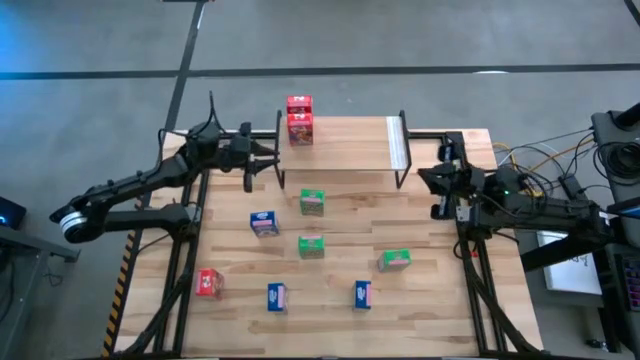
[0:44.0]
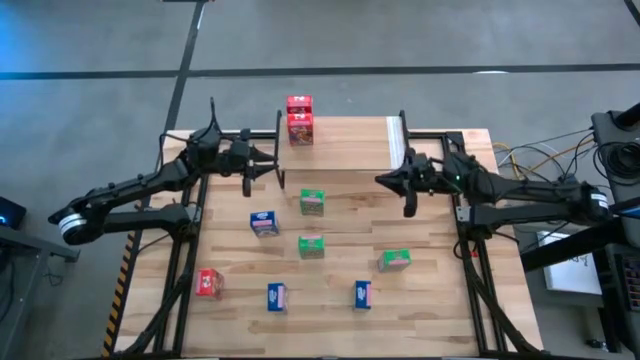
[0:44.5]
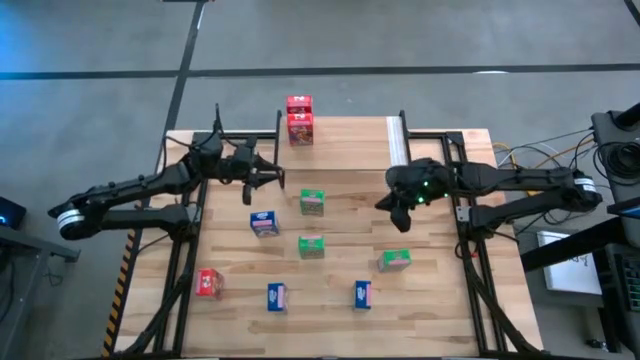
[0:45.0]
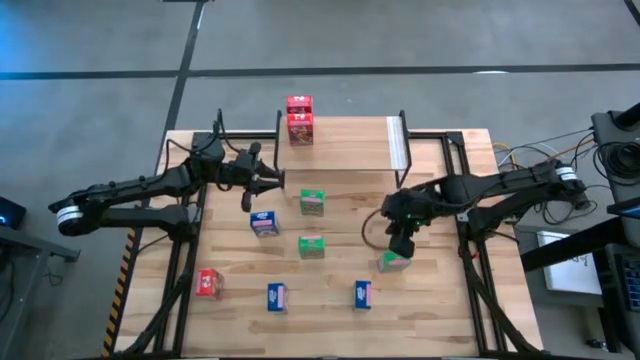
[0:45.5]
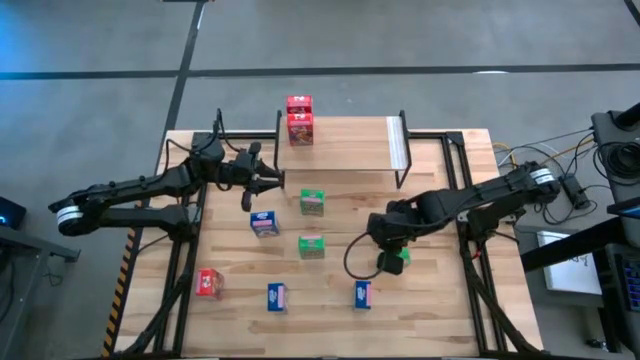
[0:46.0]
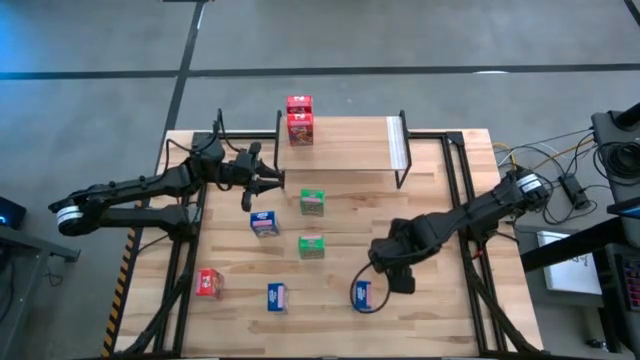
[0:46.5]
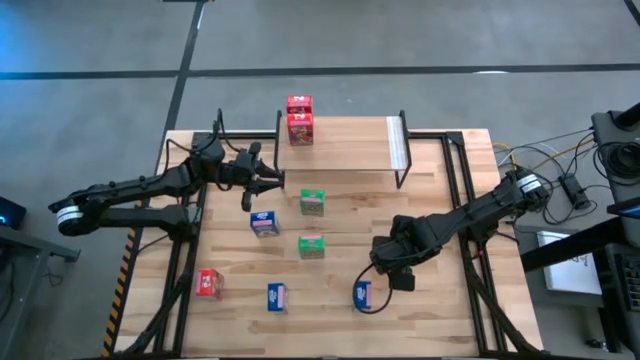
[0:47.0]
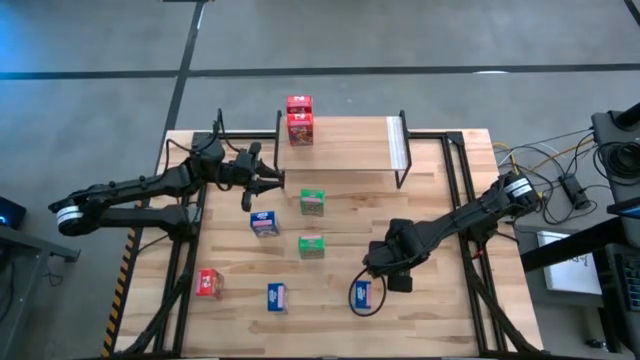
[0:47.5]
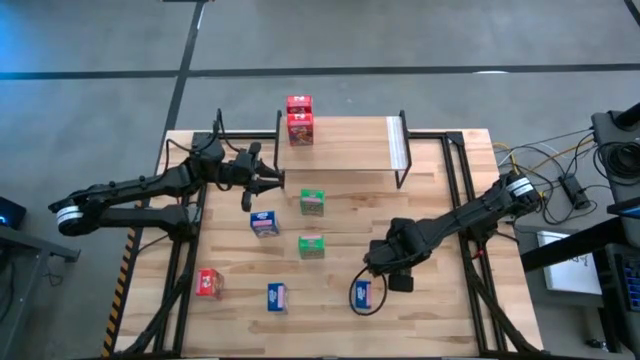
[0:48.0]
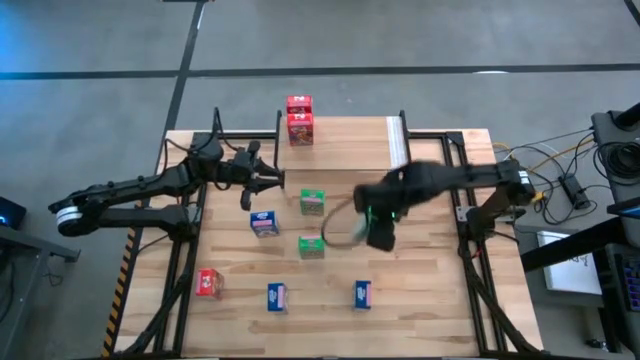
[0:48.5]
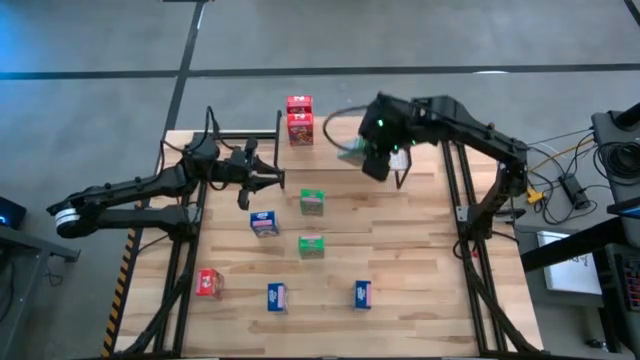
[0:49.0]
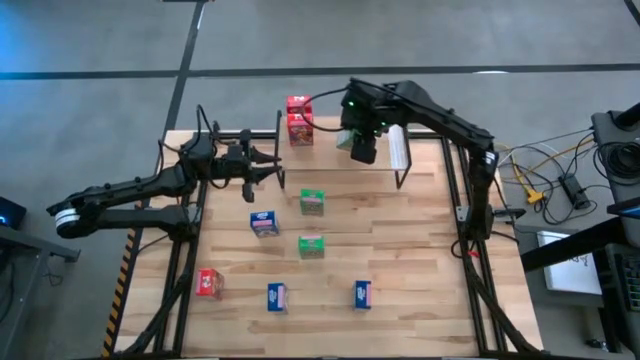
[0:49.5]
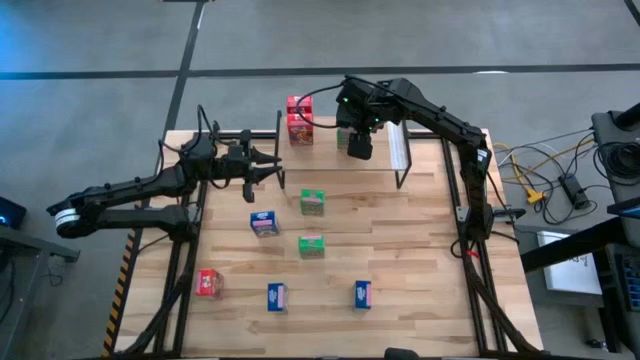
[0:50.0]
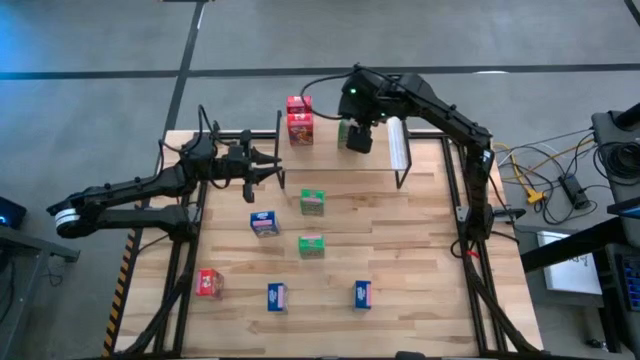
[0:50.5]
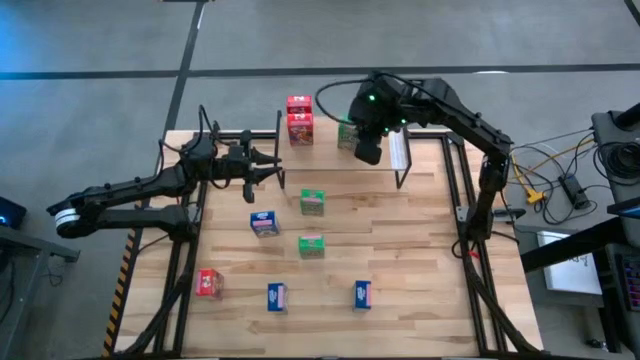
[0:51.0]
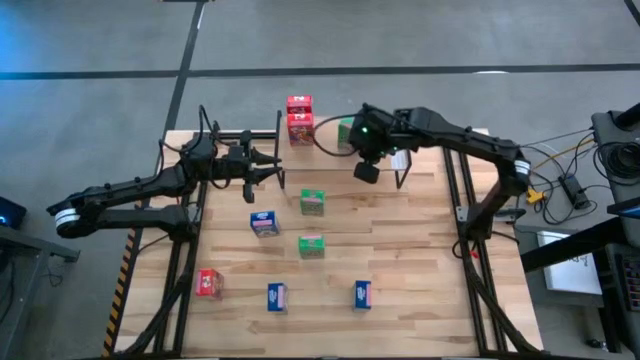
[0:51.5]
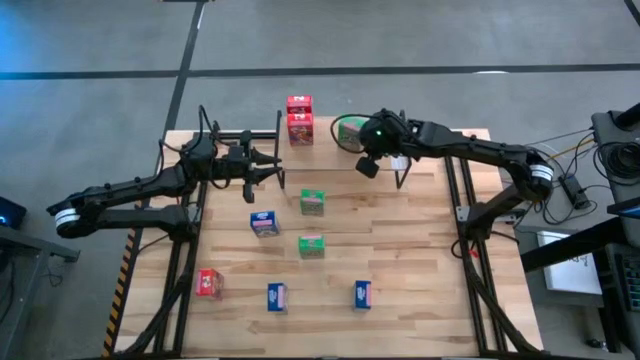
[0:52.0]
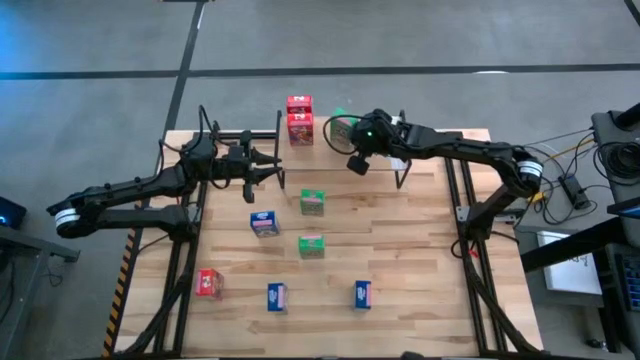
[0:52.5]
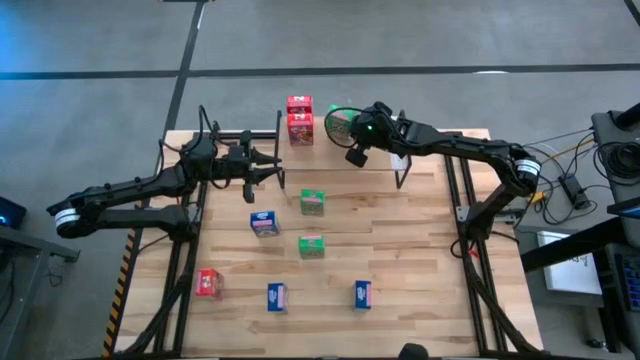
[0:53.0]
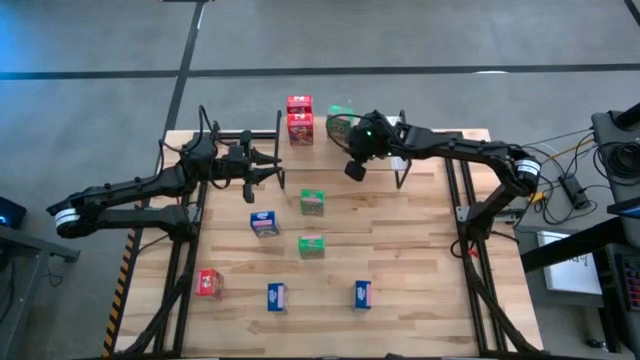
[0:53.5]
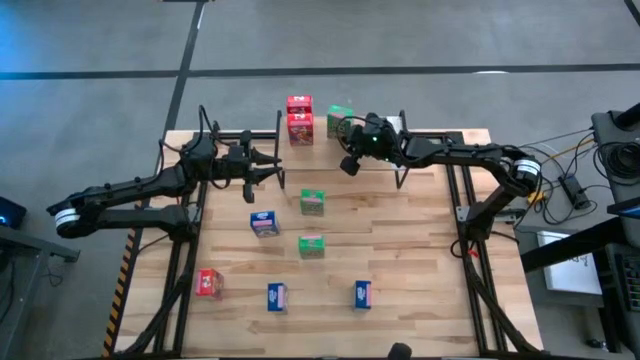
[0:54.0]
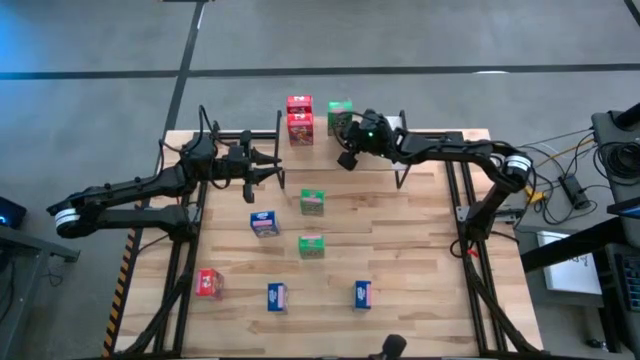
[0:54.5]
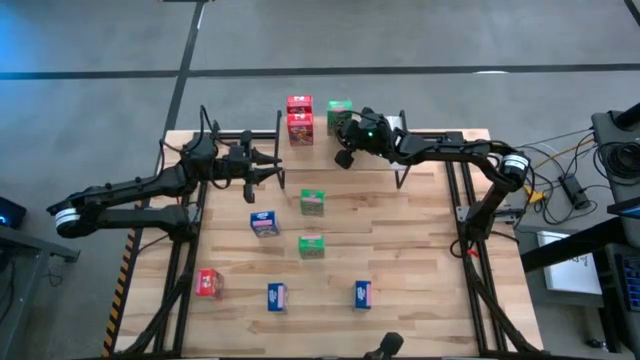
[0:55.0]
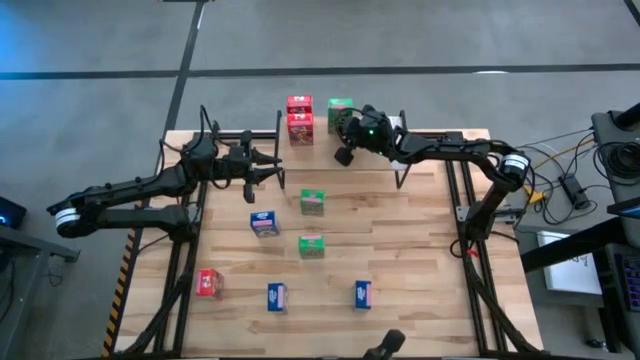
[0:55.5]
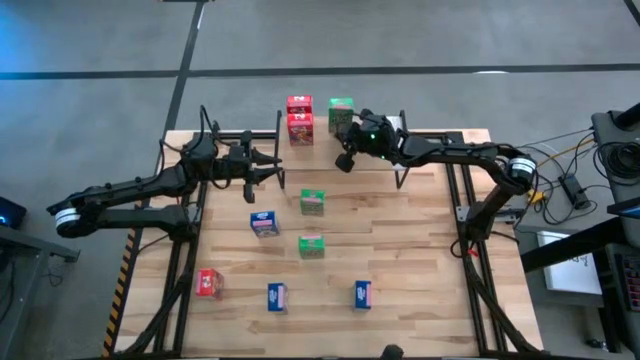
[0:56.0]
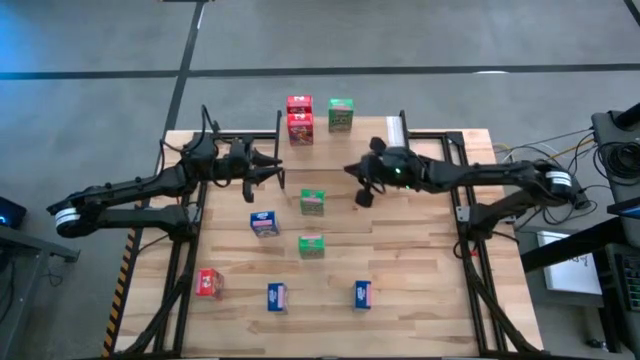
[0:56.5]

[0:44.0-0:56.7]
Task: Stack cereal on shelf
Put the bottom left green cereal box on the shelf

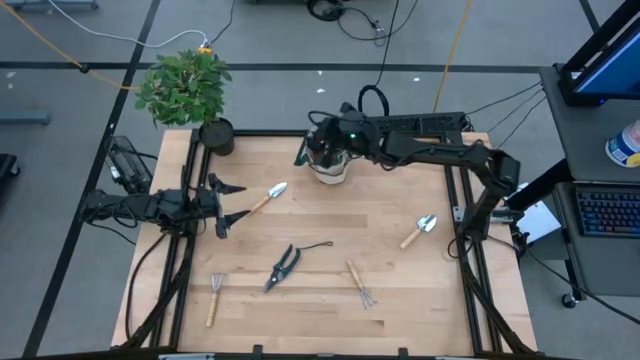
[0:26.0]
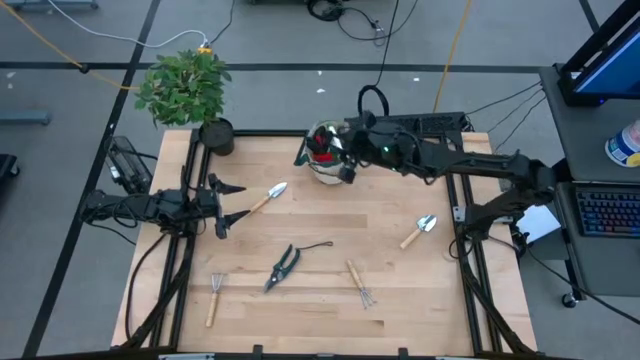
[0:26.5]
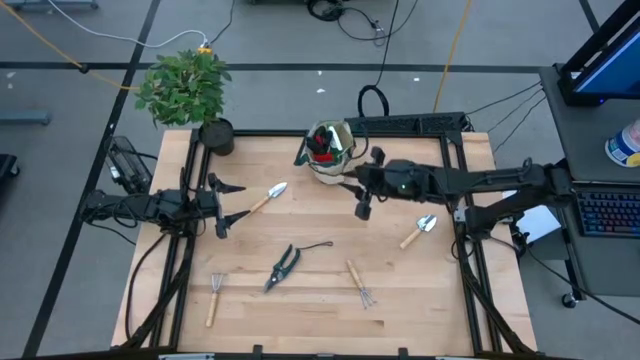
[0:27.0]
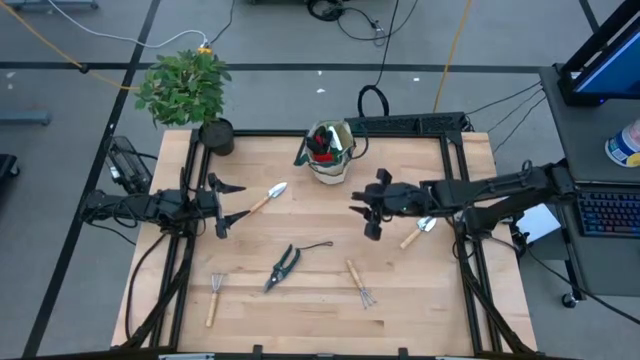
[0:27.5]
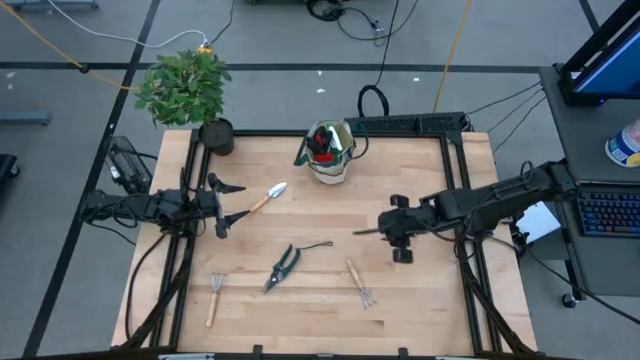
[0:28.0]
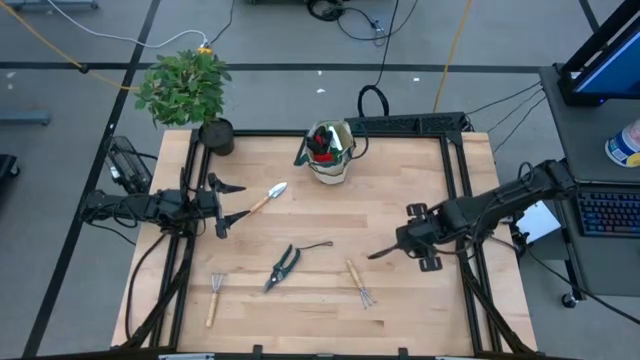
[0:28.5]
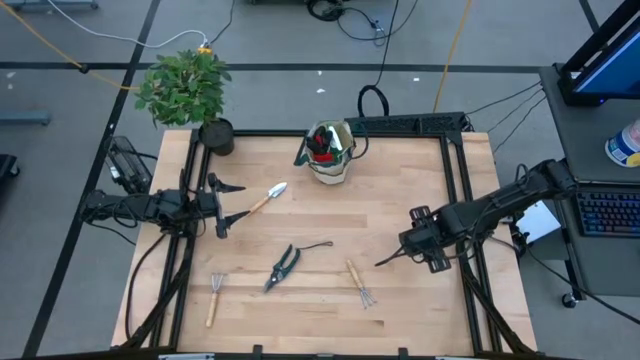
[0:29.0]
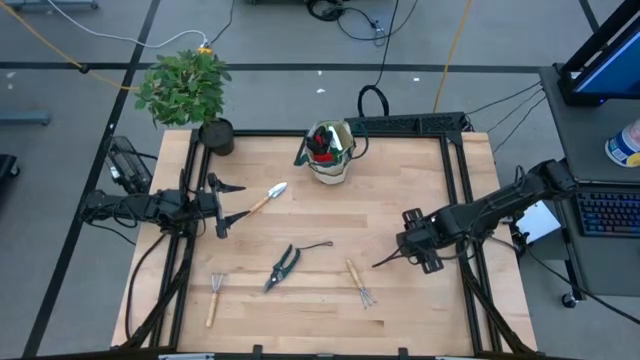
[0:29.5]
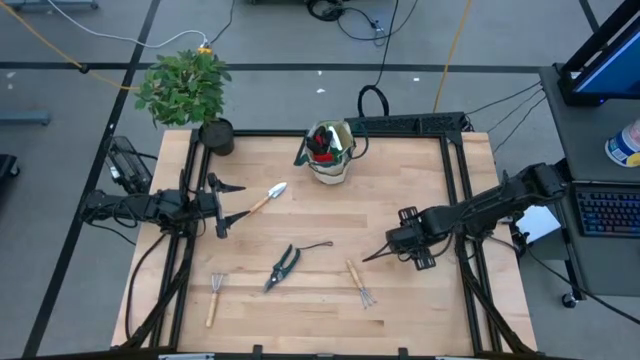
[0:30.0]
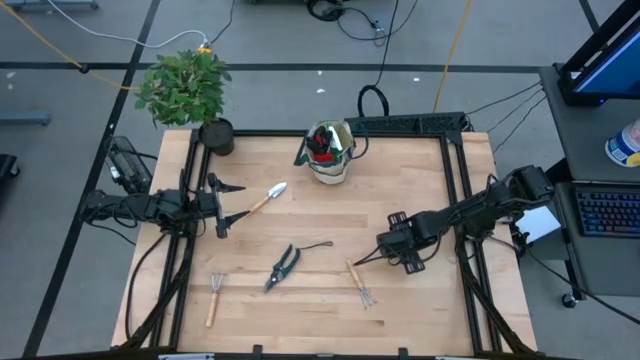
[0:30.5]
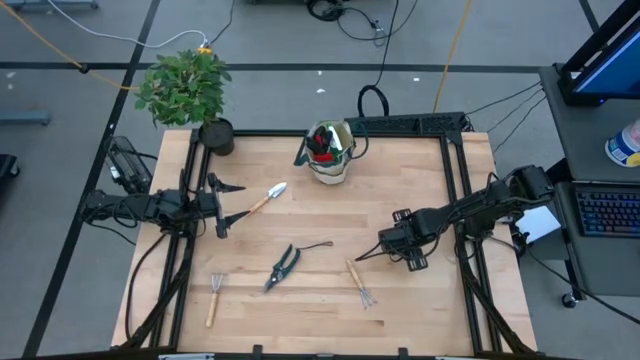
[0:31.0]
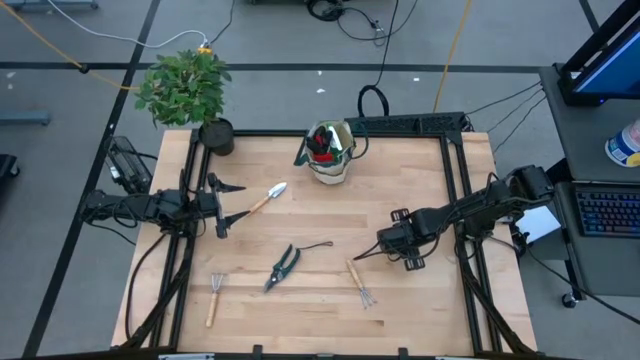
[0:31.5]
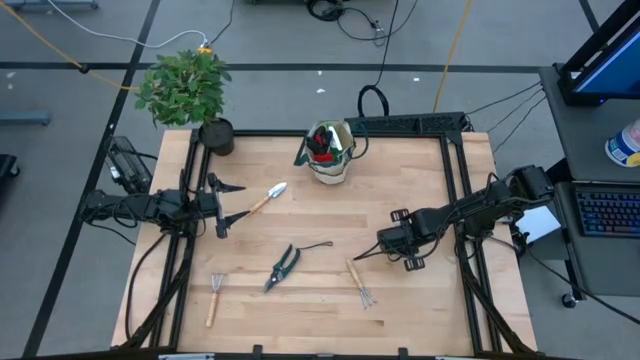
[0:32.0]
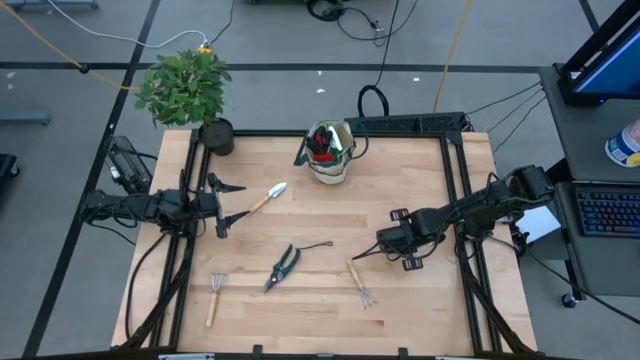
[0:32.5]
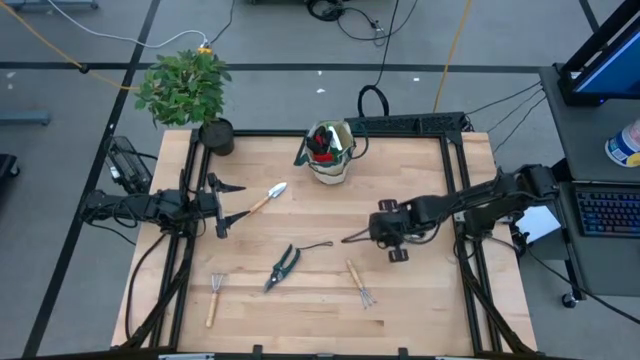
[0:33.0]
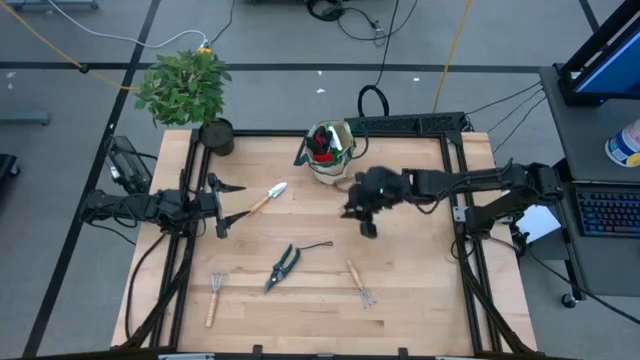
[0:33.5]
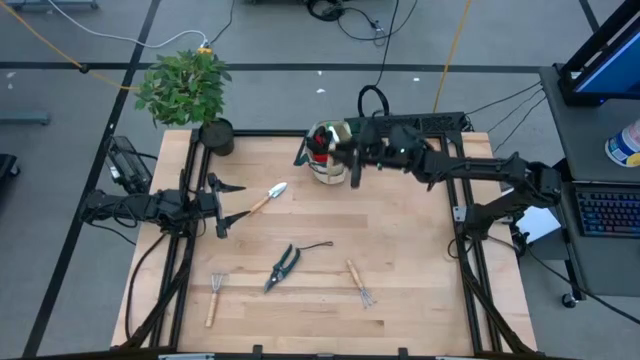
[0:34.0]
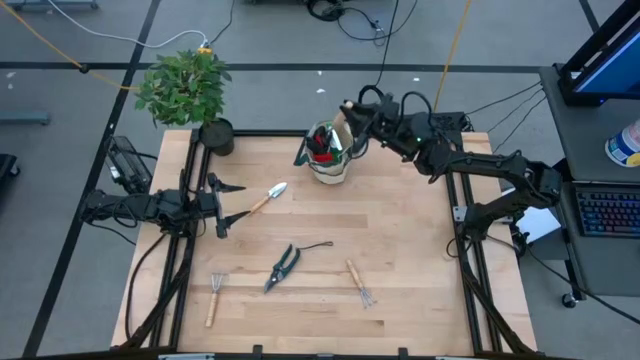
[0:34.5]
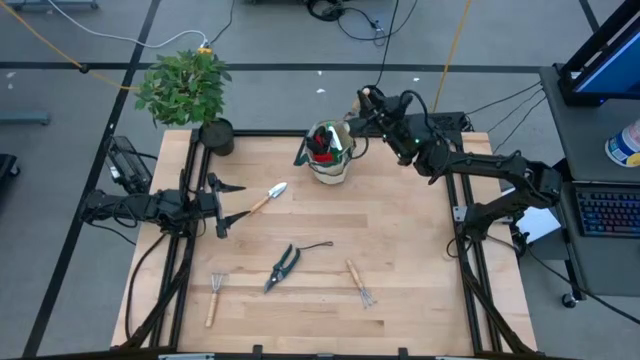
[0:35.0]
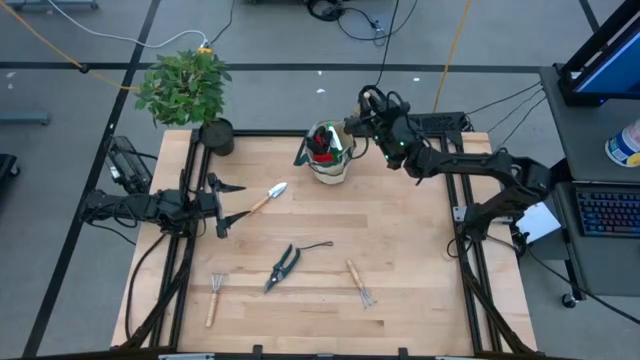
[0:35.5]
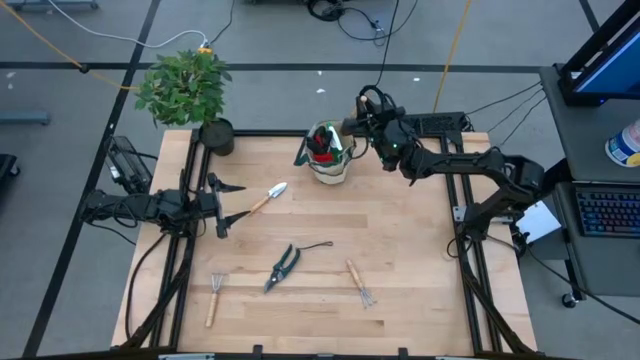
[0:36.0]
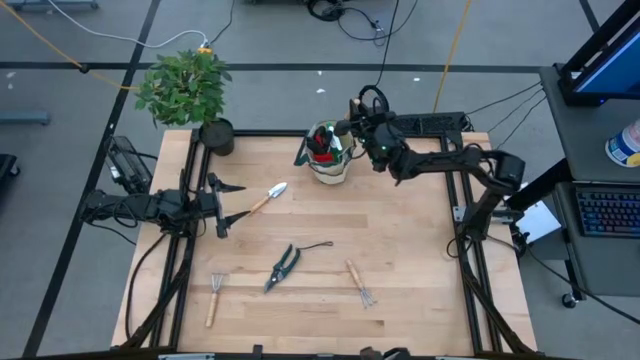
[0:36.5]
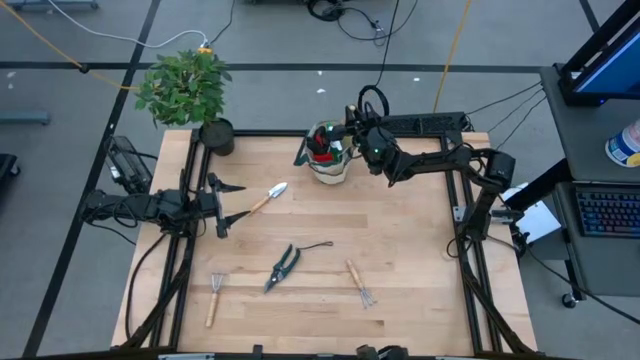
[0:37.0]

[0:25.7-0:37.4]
Task: Pick & Place Garden tools in Gardening bag
Put the right brown trowel into the brown gardening bag
